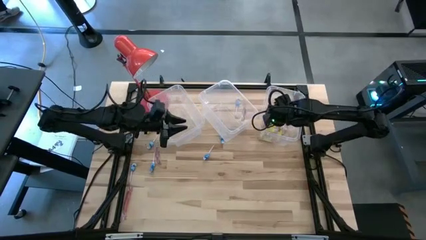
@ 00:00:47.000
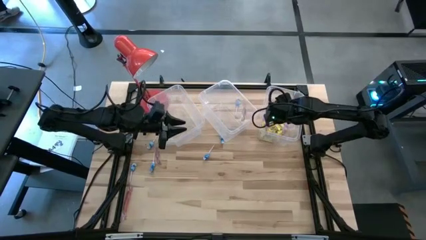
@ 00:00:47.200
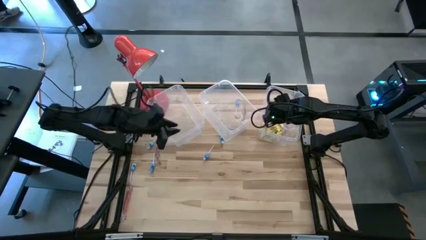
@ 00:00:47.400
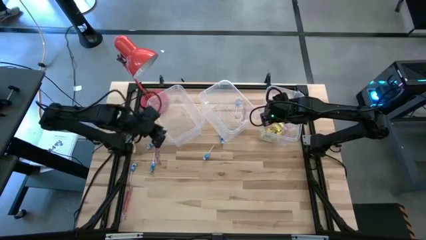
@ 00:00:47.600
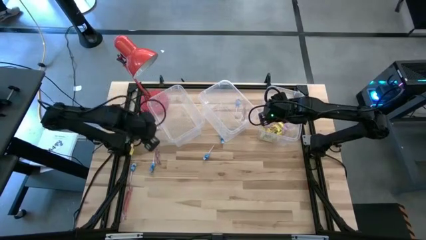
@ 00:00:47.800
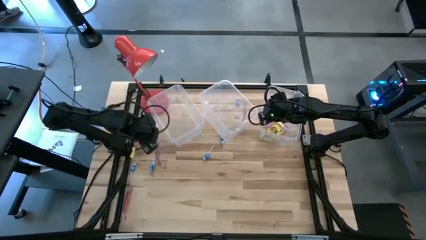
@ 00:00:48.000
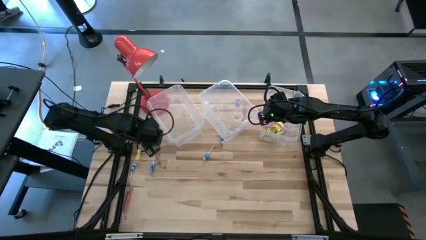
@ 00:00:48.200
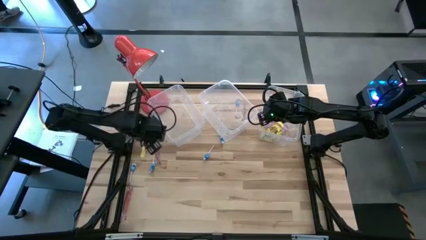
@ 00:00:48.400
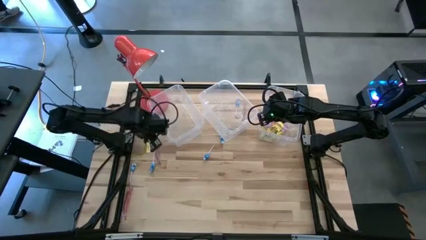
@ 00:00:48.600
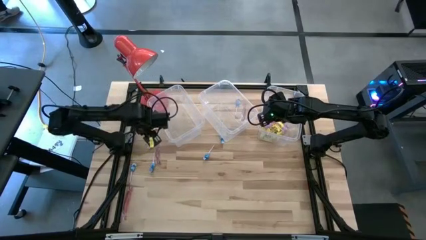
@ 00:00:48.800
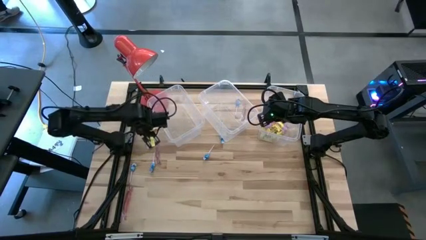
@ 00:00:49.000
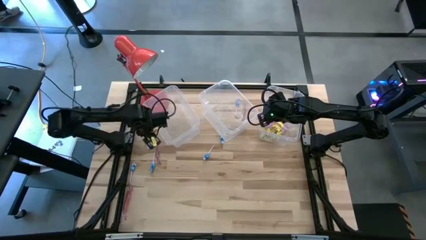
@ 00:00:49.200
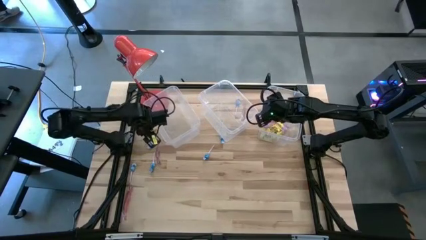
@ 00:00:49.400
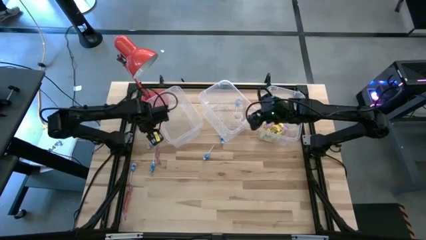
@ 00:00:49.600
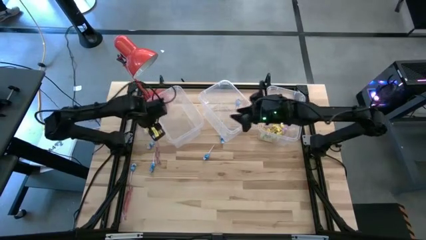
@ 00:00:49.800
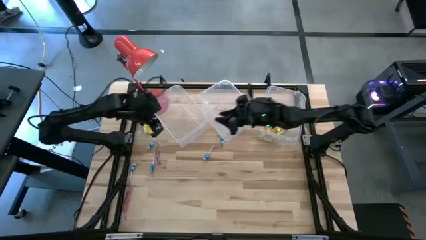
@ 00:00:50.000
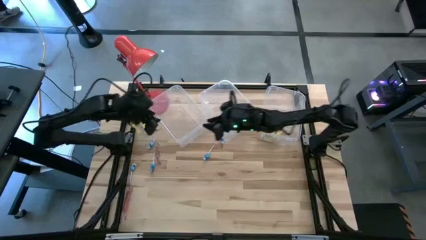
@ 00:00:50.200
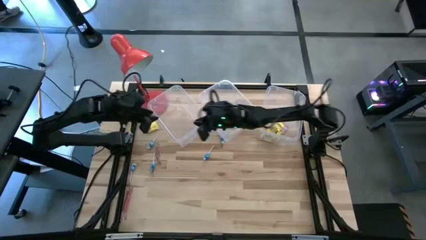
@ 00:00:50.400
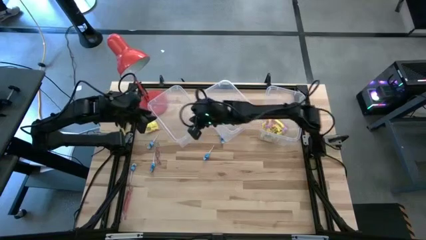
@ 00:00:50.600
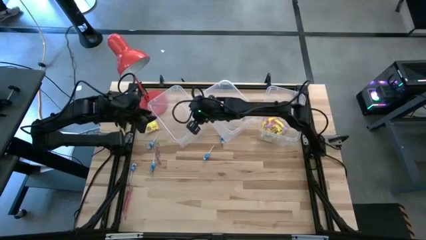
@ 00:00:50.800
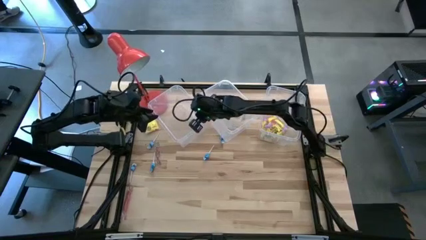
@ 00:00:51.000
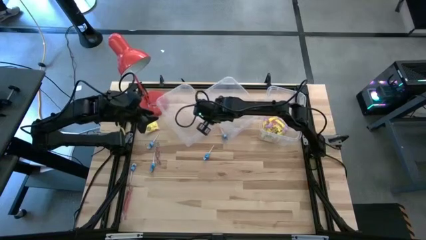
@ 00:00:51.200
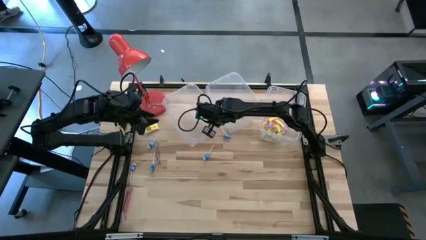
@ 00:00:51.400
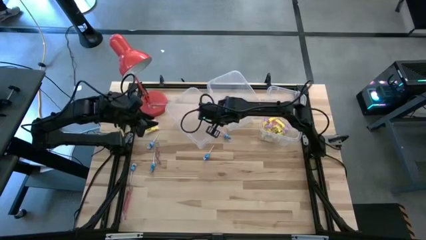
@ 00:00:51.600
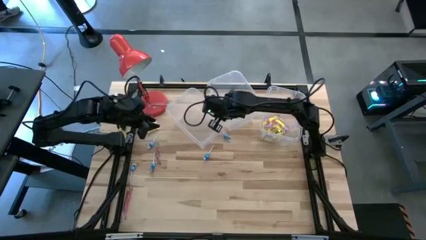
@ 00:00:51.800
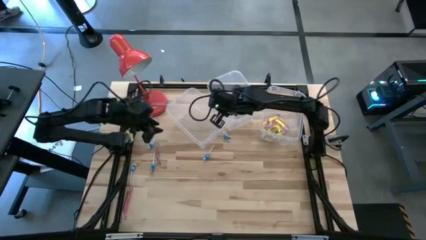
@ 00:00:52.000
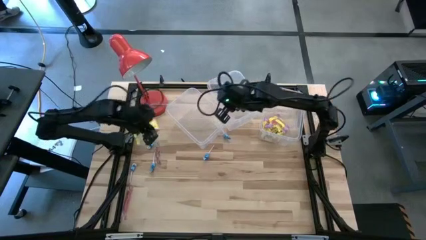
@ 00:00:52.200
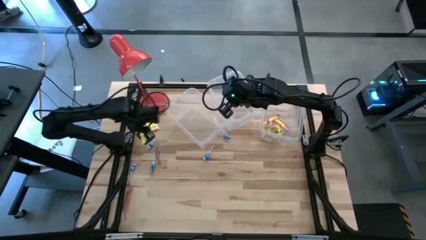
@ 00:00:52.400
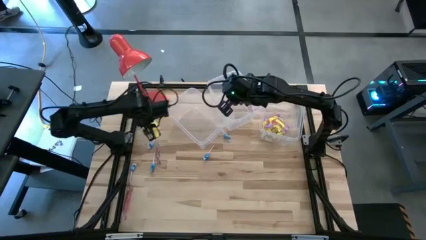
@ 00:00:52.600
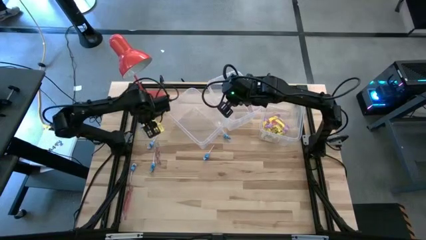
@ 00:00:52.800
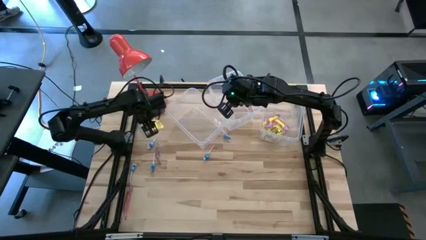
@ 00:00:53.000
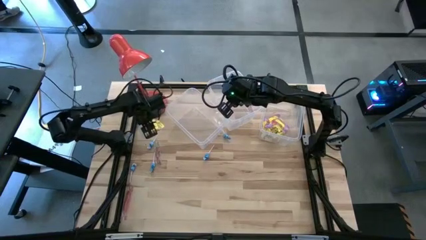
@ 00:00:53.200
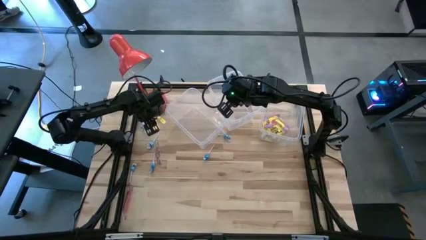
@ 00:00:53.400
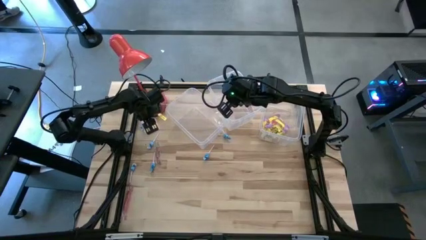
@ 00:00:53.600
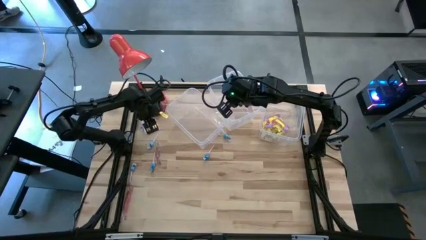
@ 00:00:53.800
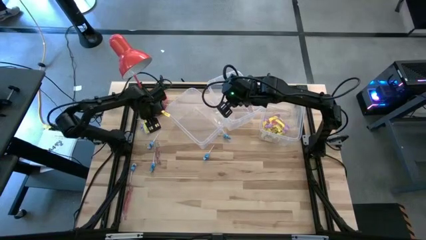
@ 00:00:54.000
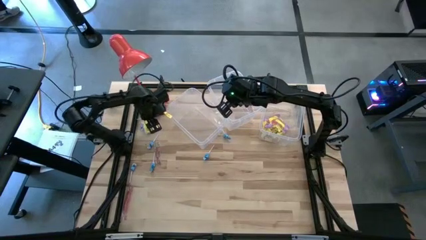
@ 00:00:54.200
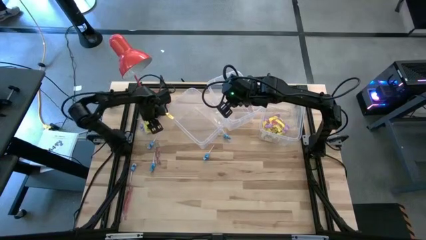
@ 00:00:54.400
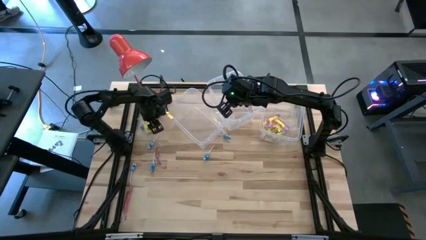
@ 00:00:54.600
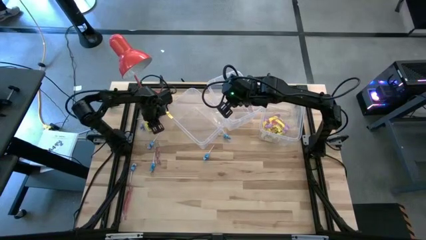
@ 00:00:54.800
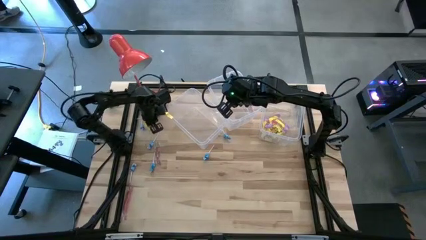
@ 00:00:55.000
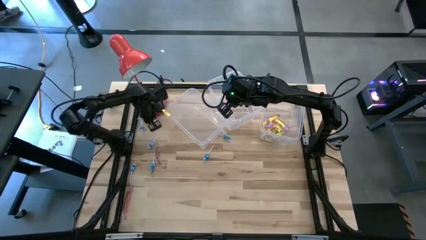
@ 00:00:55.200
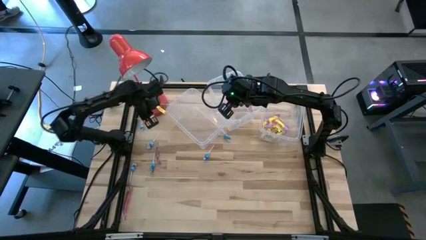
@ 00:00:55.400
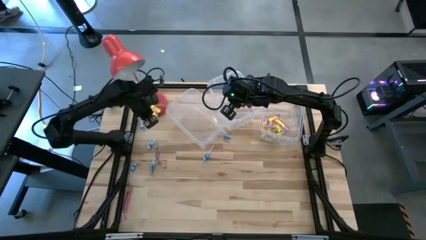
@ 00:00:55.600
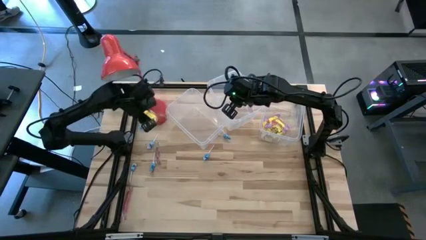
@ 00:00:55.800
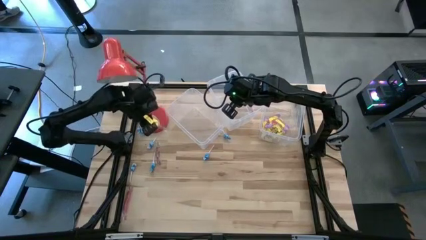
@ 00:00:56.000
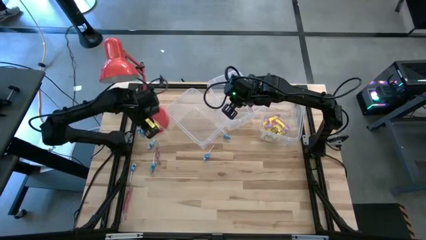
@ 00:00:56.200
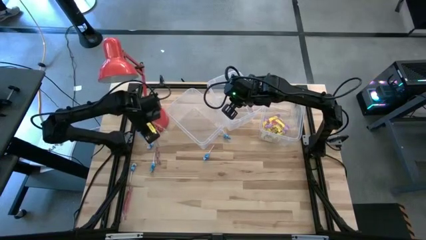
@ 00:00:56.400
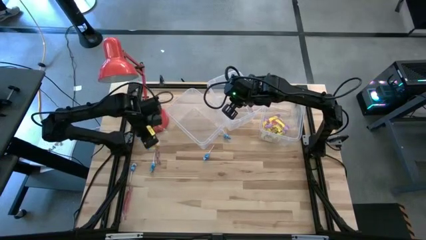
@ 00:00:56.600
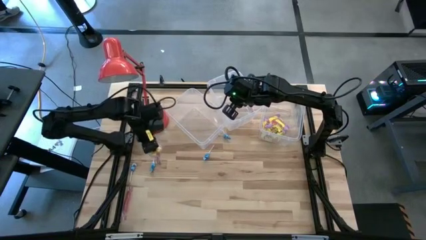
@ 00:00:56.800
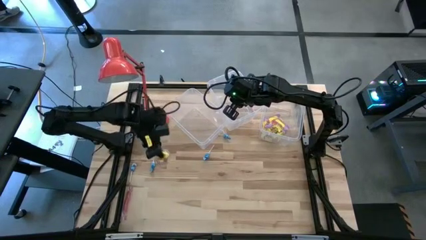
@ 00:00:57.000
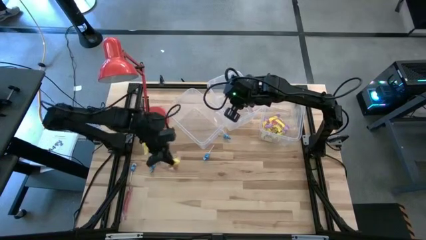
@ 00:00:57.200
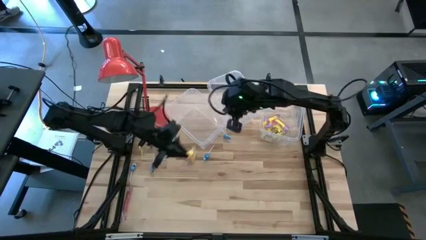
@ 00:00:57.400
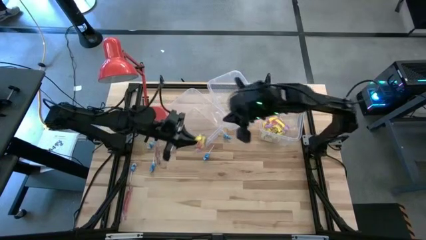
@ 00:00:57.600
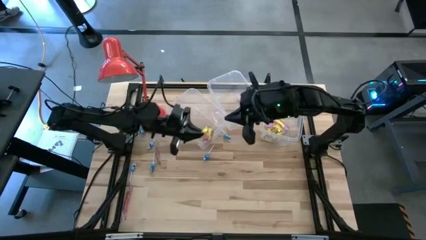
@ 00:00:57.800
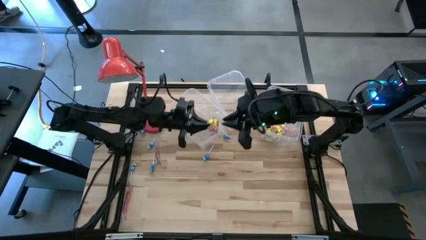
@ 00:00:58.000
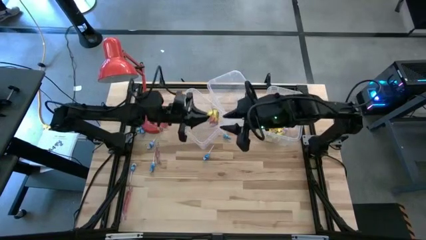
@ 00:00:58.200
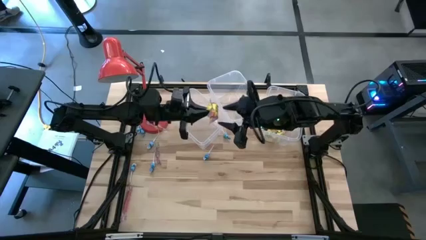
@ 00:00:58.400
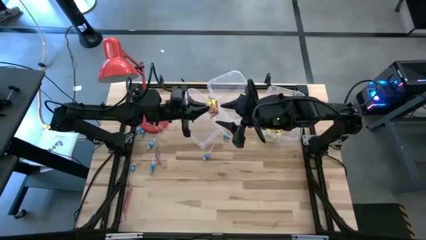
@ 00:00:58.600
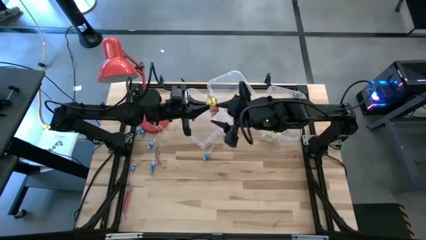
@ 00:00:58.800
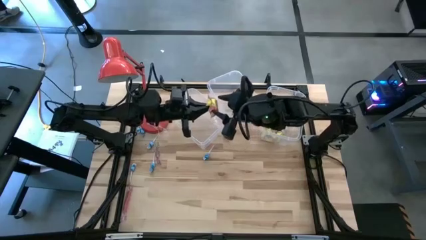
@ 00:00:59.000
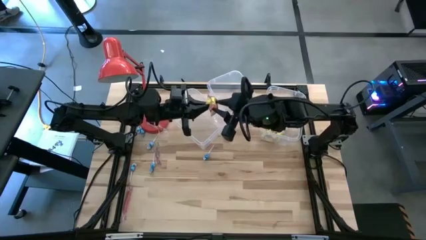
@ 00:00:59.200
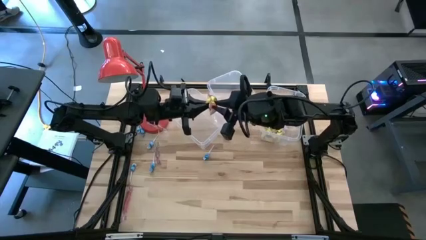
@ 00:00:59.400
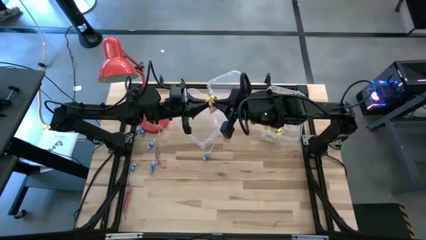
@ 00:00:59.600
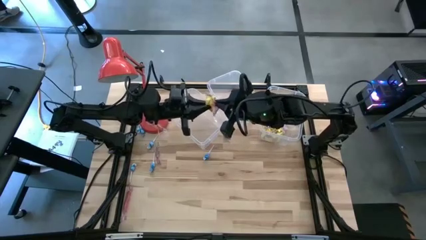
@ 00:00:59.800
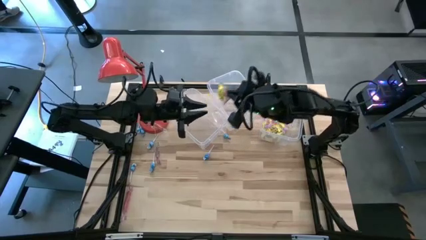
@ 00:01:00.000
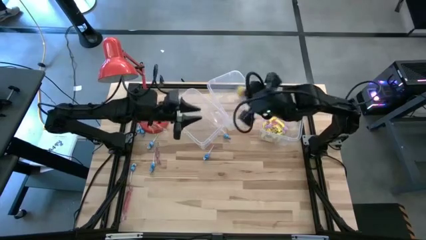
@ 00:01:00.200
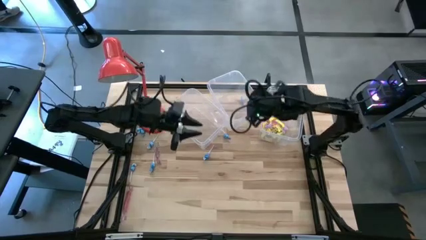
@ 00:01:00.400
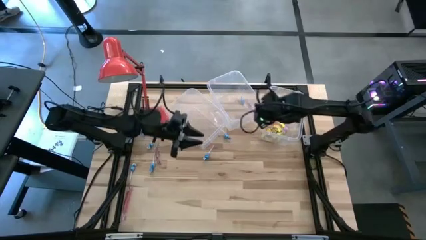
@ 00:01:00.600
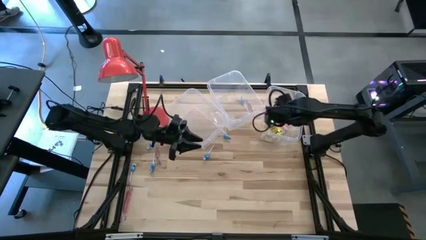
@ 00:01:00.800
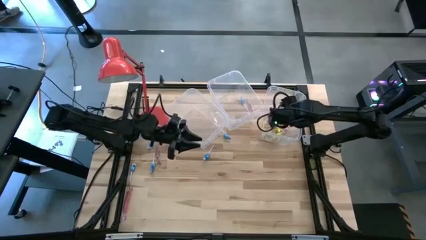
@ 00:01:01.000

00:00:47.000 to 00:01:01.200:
Task: Sort candy
Put the yellow candy into the right transparent bin

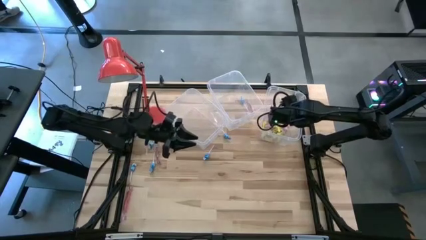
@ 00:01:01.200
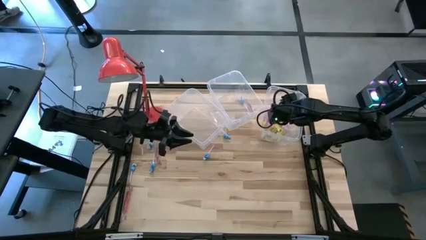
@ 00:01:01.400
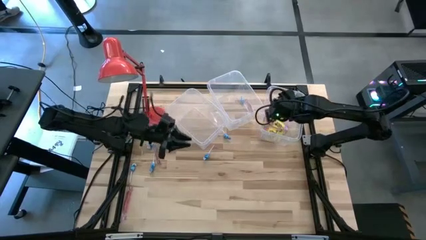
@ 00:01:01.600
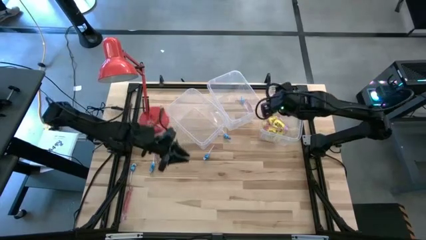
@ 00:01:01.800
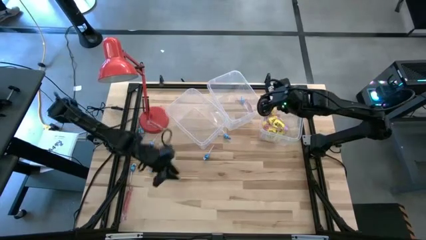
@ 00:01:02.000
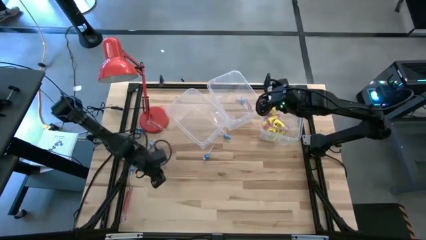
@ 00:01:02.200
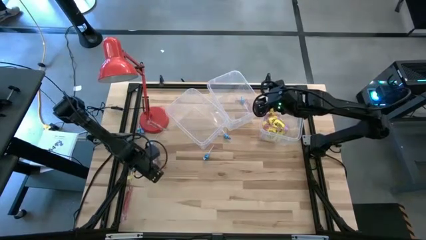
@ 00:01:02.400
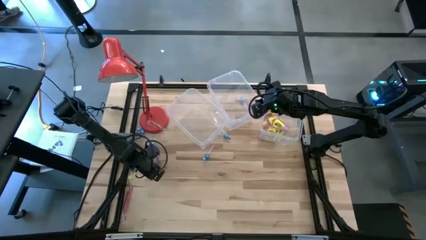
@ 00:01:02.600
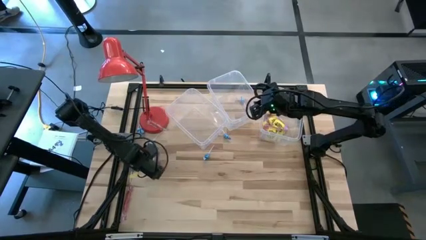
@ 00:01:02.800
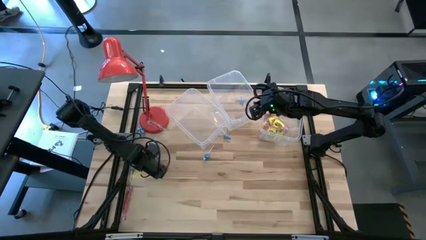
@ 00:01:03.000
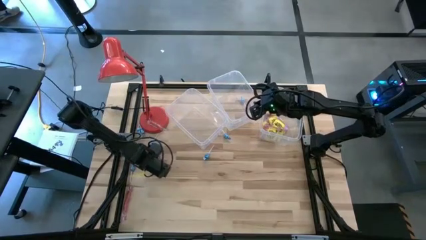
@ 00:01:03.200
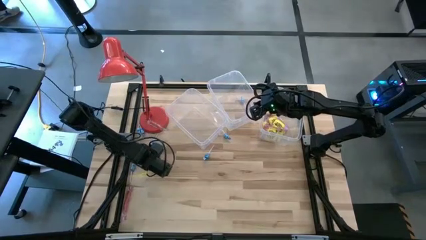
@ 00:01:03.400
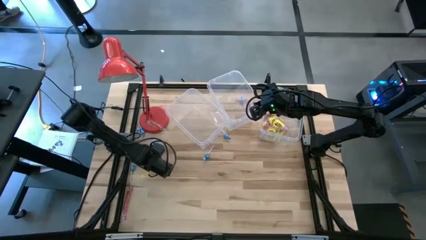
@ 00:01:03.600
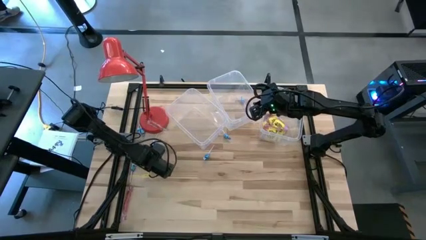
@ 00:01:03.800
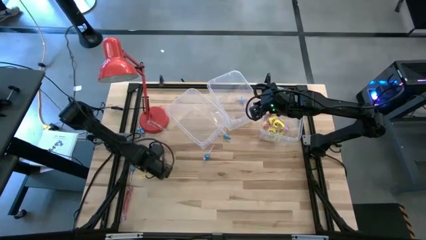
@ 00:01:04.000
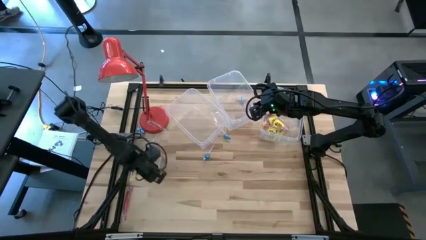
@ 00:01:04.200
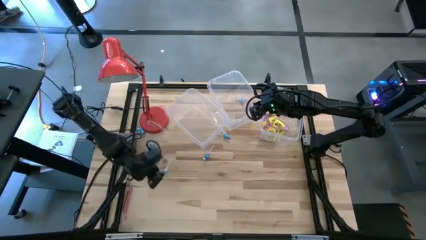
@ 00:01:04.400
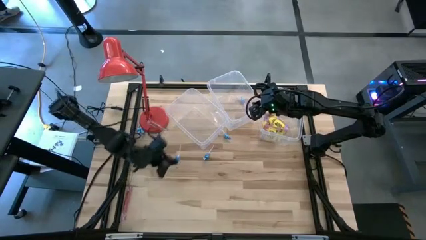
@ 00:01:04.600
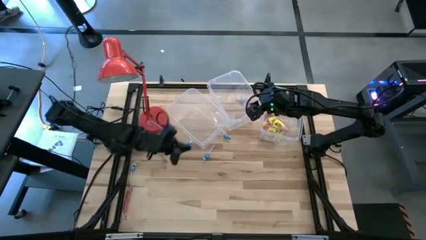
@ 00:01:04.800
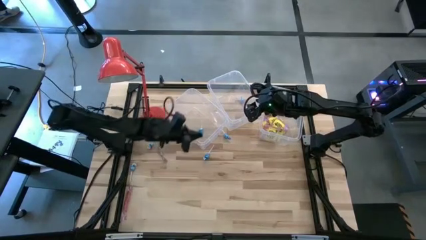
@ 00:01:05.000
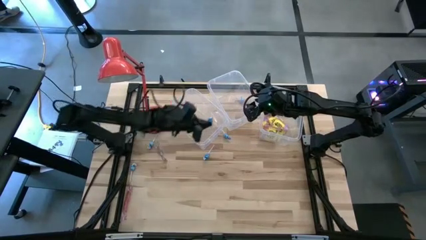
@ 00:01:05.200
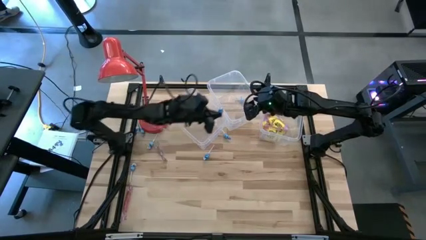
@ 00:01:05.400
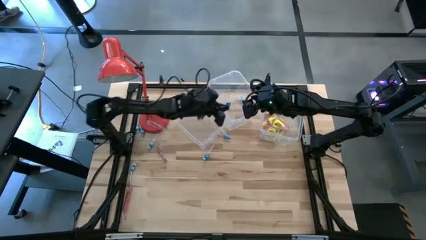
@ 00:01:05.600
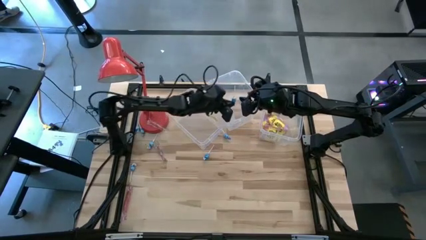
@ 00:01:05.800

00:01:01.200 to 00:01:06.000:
Put the blue candy into the center transparent bin
